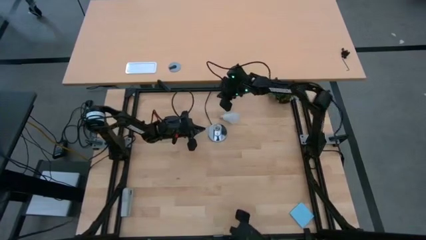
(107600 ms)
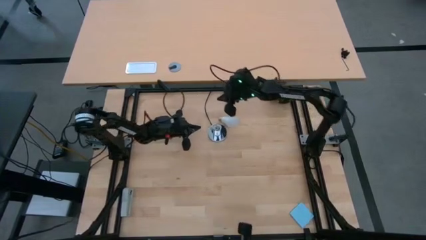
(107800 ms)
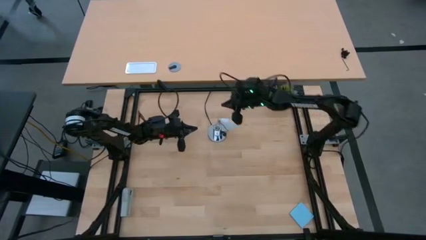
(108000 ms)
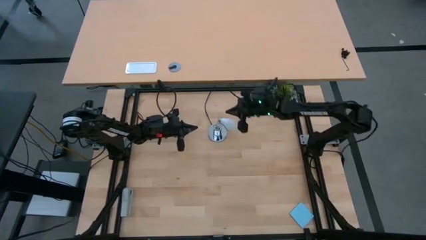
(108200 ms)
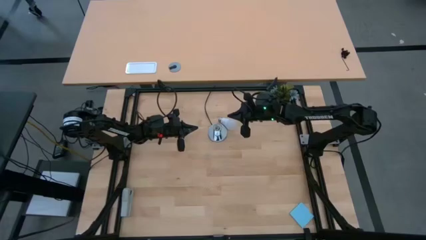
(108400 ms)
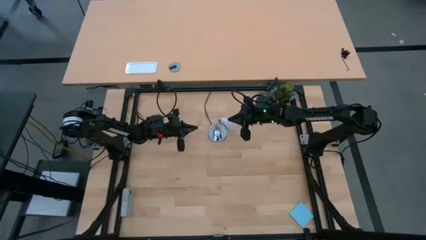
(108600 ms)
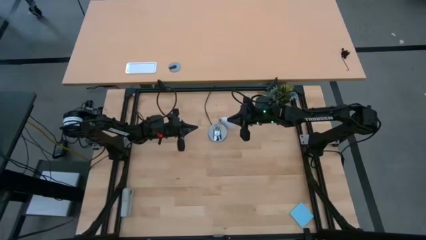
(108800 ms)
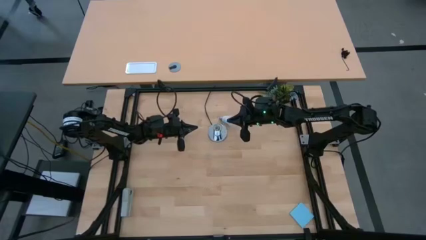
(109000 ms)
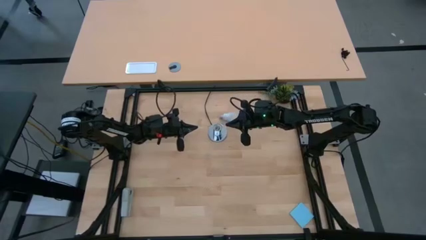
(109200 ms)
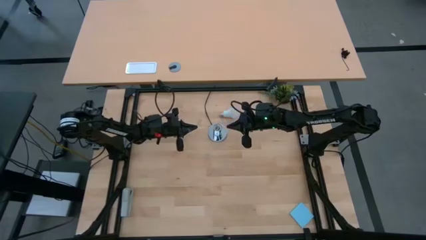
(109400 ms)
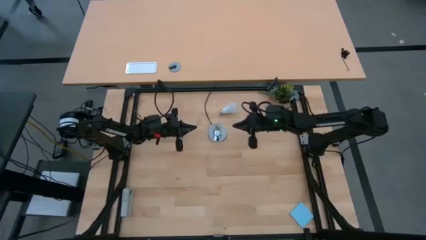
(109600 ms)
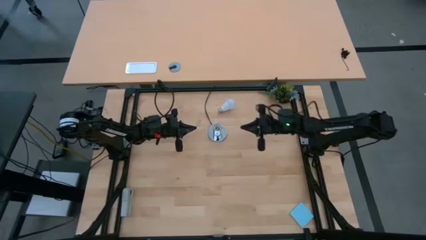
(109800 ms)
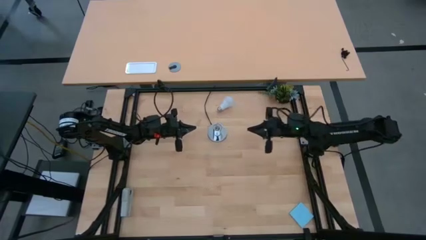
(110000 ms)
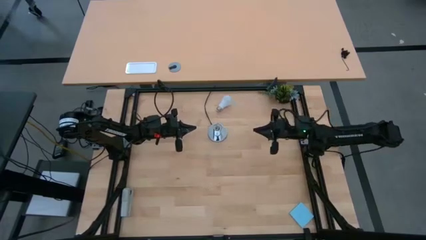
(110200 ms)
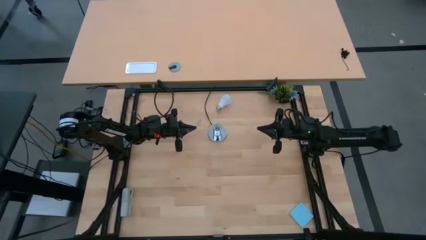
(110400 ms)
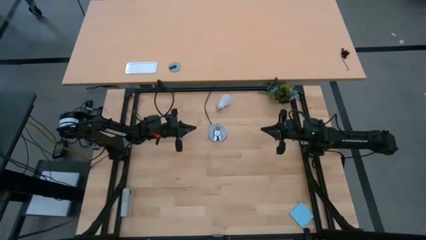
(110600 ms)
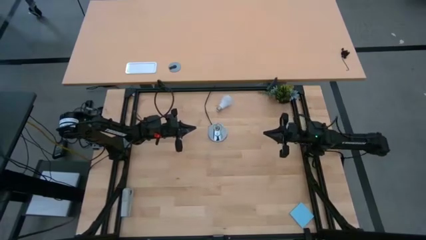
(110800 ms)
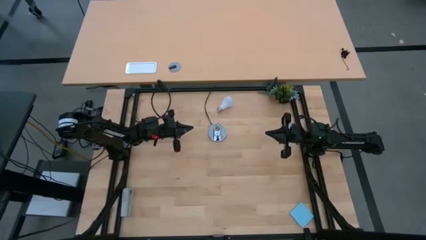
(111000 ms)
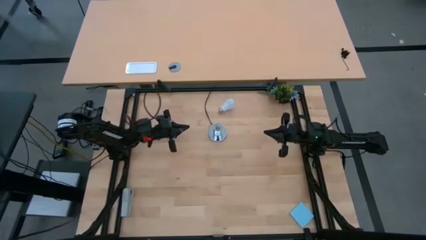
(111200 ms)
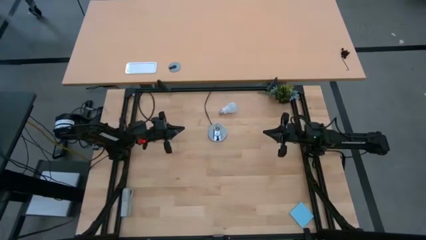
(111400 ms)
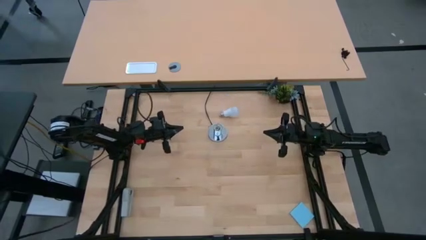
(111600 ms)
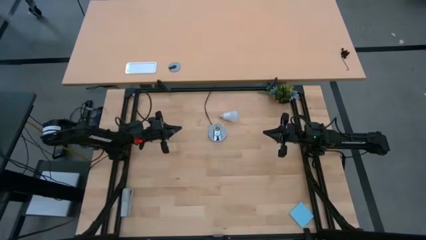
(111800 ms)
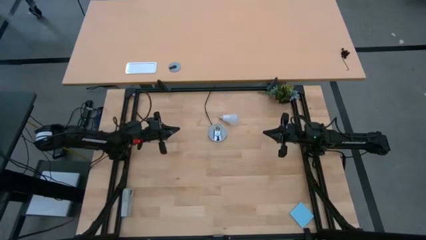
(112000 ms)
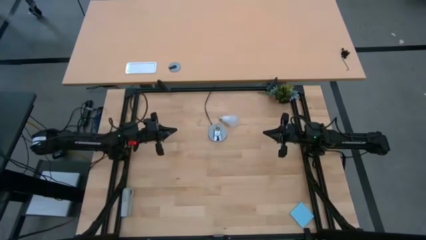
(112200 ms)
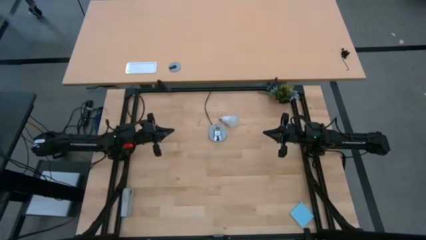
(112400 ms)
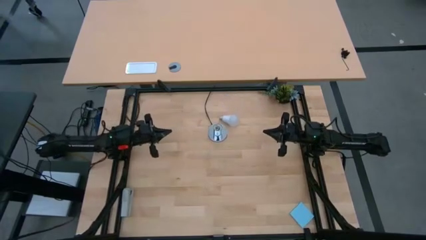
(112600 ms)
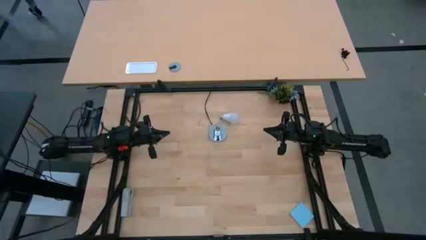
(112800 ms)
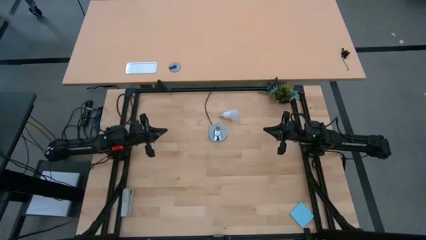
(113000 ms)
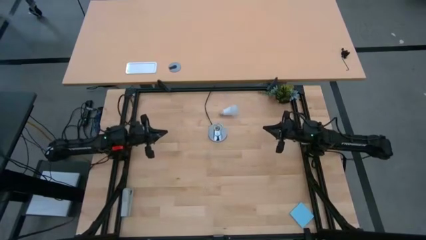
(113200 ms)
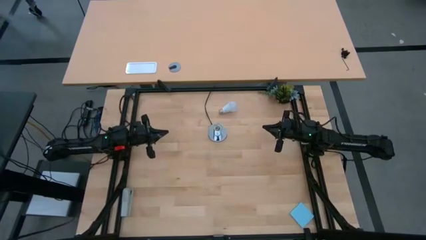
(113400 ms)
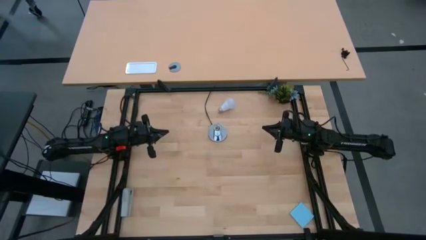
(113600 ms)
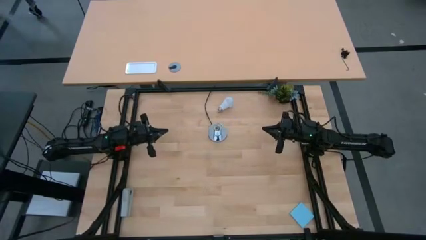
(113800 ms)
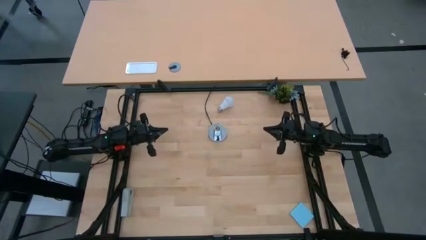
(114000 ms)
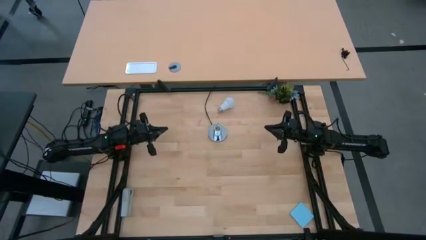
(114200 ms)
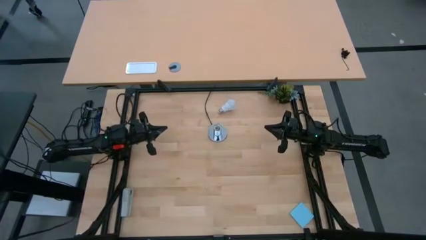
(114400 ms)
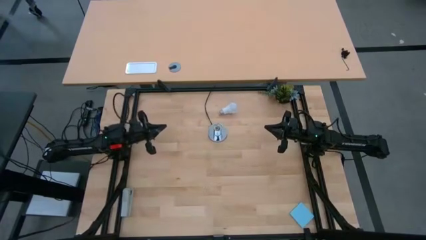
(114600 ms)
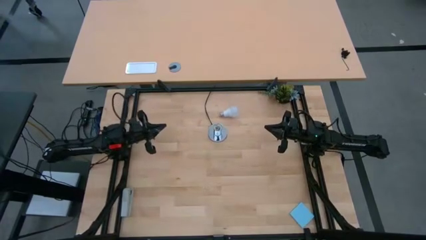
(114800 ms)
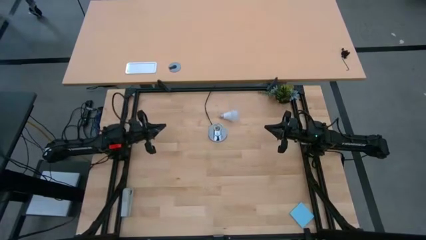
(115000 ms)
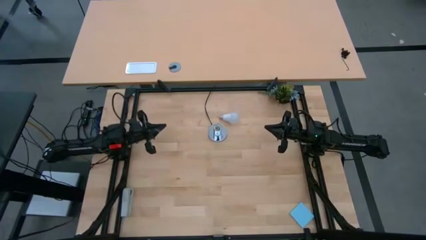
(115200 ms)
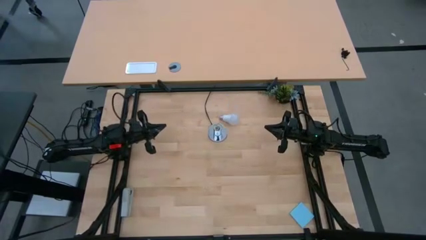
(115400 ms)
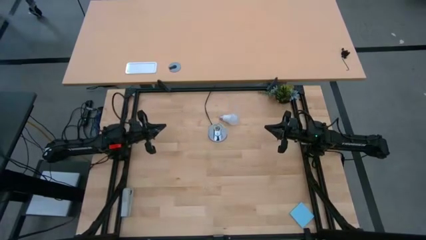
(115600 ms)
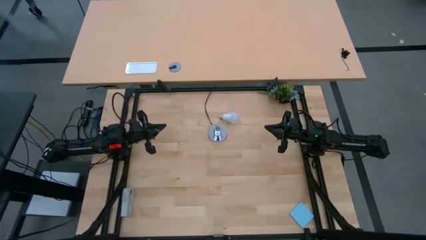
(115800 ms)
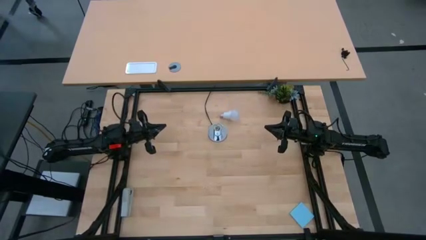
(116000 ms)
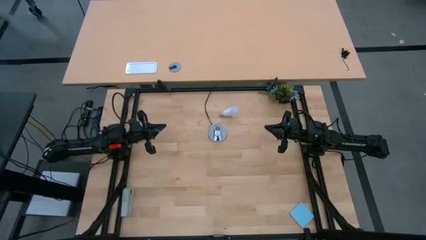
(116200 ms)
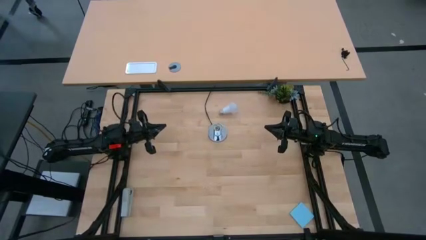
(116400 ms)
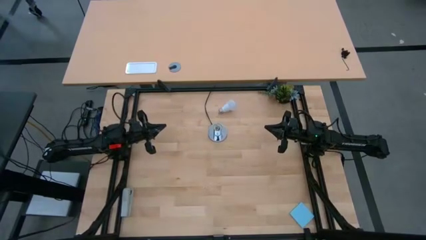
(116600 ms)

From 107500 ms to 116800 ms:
Task: Screw lightbulb
Return to Home Position

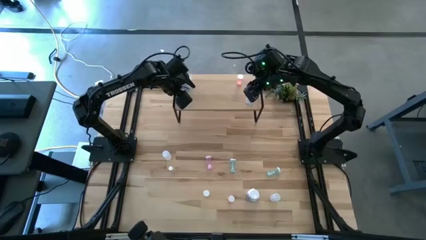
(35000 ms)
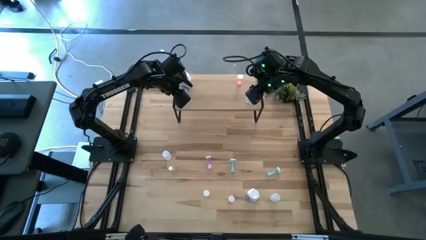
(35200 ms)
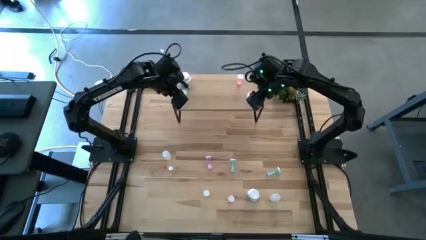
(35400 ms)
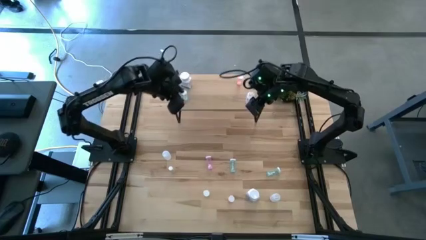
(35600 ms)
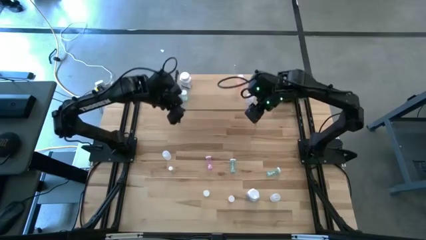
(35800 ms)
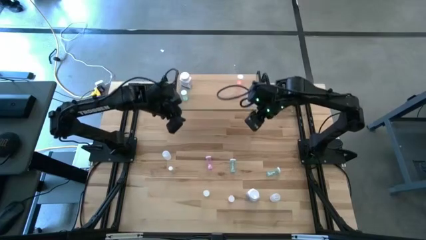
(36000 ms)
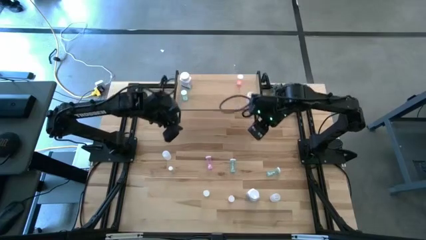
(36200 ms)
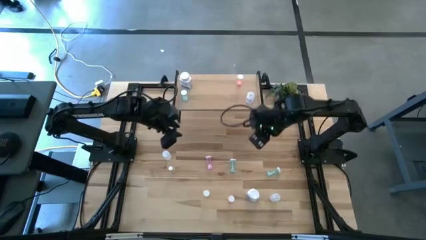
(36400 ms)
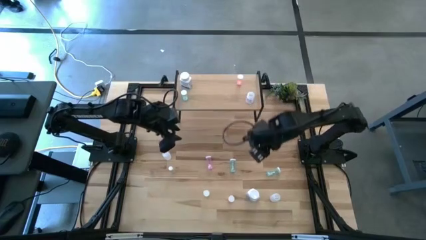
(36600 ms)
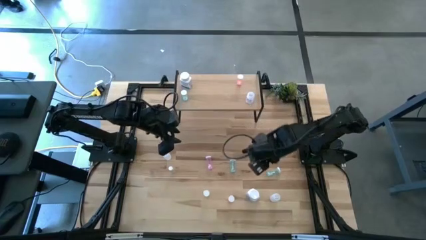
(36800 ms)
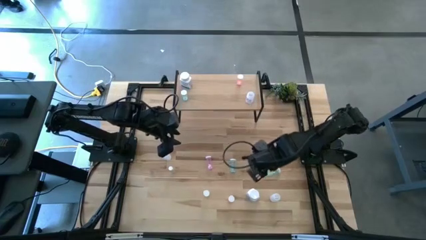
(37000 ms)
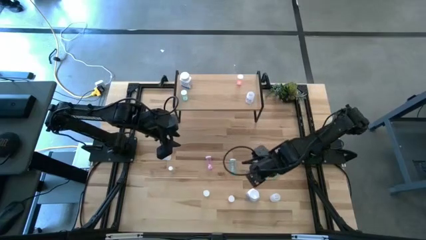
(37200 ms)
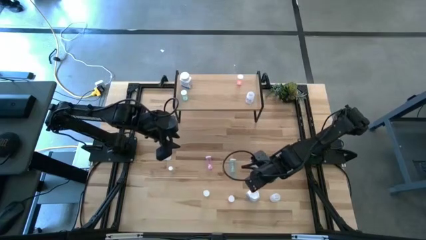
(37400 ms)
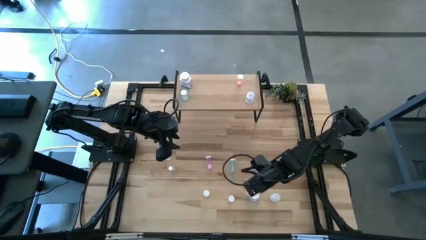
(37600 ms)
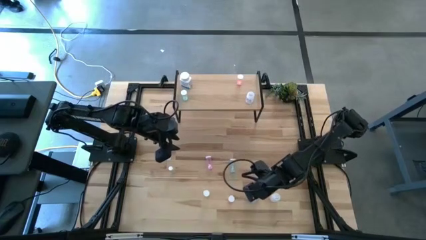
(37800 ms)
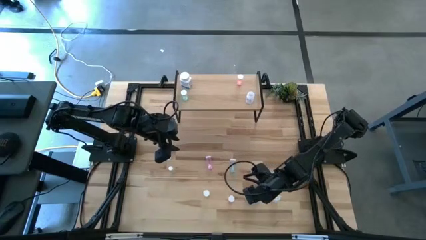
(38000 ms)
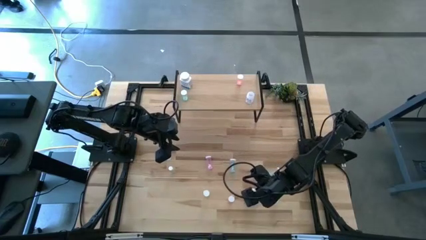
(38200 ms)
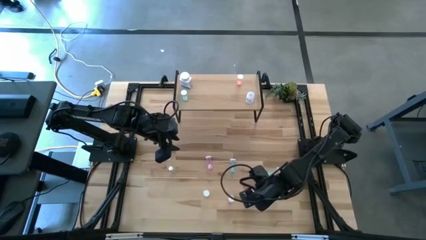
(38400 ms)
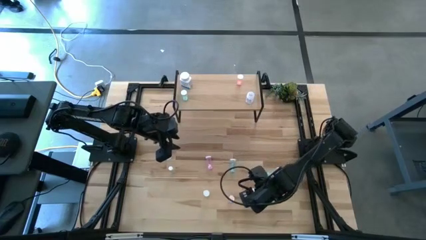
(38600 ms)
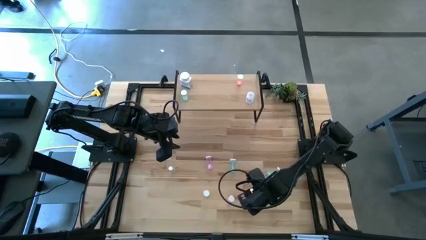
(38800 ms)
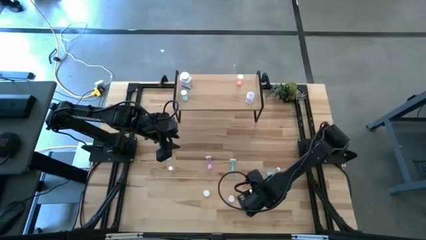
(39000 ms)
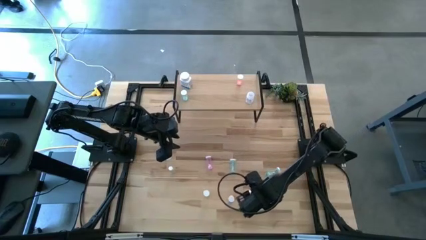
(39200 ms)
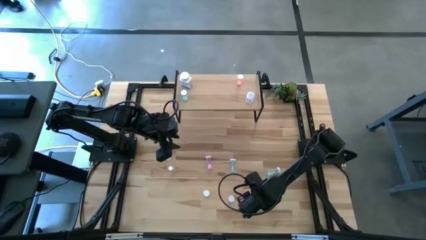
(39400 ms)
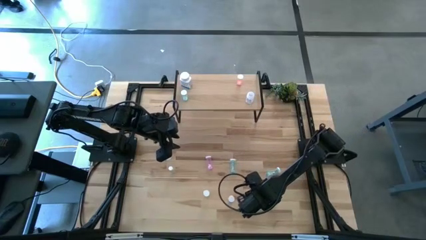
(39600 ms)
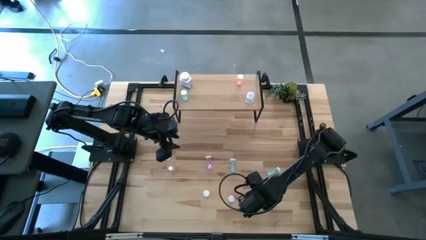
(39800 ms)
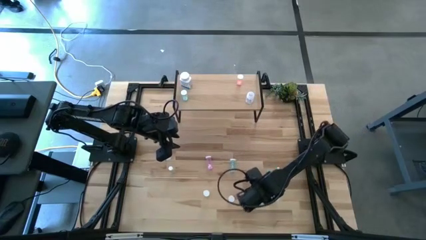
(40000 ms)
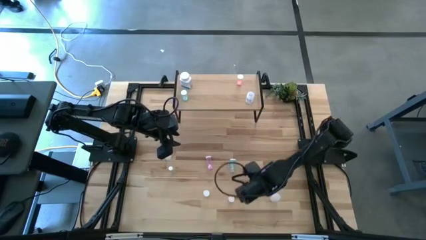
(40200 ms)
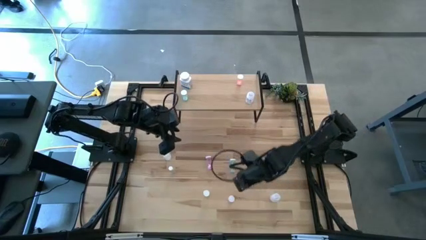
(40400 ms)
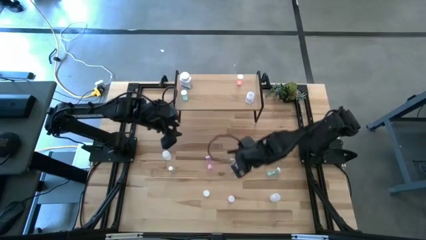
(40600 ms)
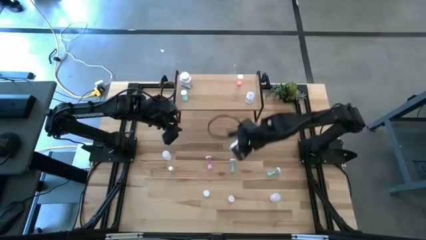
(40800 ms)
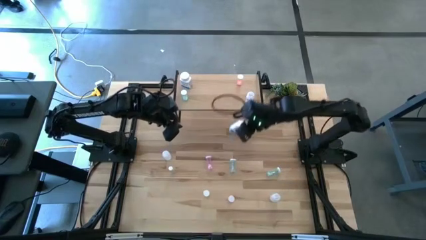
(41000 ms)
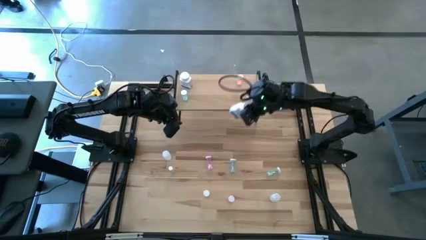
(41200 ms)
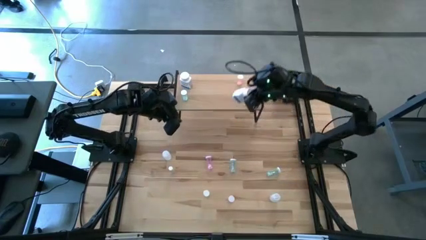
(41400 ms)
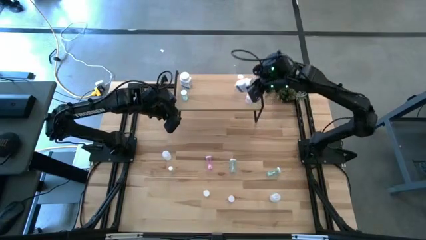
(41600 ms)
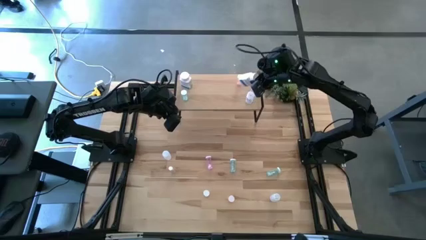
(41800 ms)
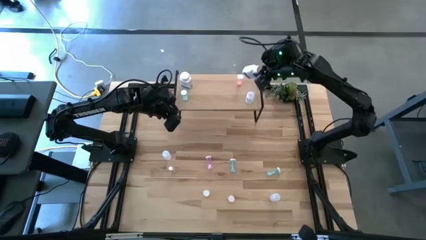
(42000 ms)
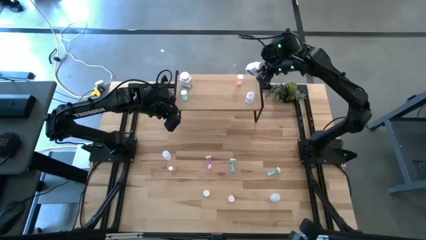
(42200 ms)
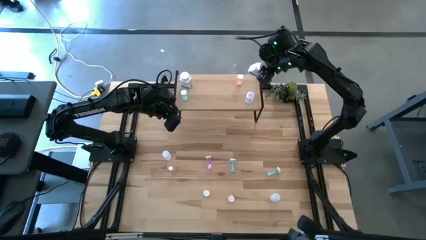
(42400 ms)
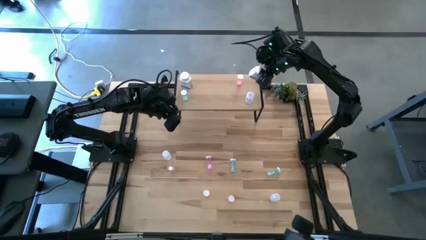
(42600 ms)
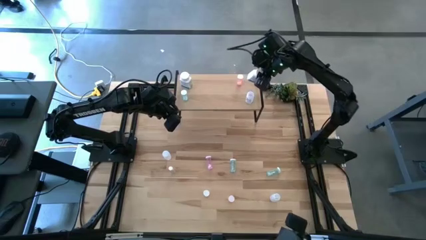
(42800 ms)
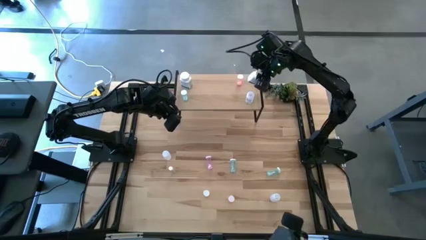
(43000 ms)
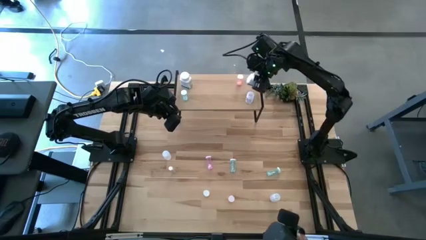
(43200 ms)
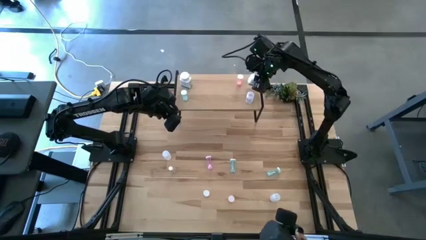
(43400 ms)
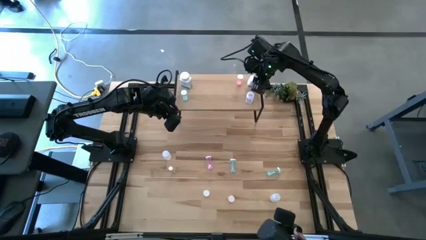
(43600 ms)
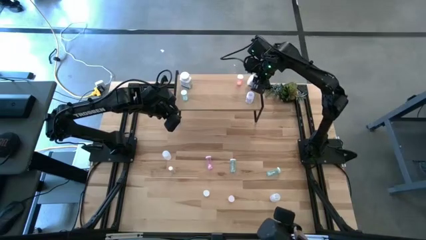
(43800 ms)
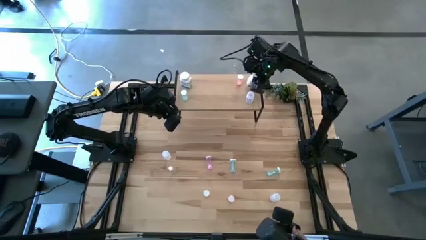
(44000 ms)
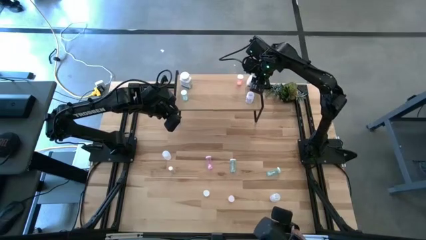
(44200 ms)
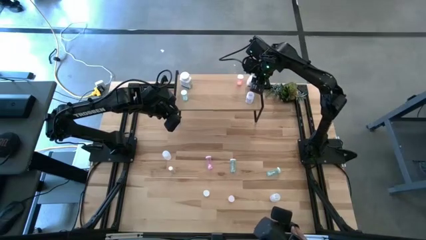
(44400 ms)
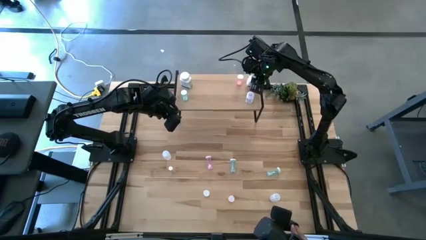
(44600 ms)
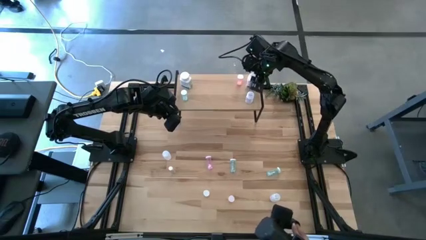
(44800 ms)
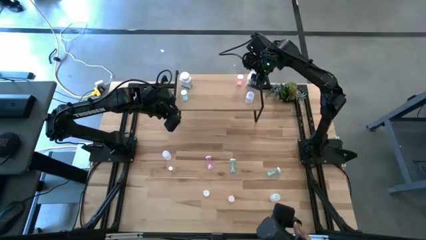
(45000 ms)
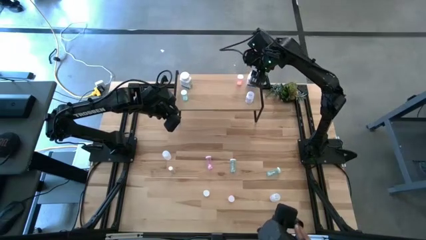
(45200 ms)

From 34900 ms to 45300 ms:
Task: Pick and place medicine bottles onto shelf by color
Put the white medicine bottle on the shelf
